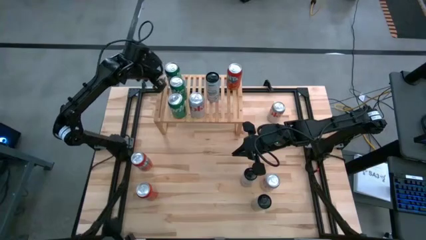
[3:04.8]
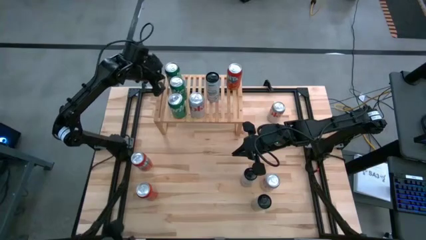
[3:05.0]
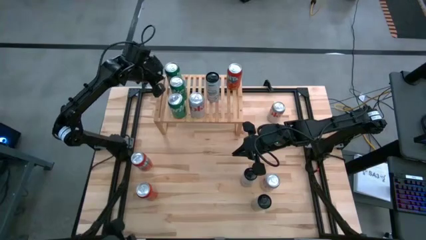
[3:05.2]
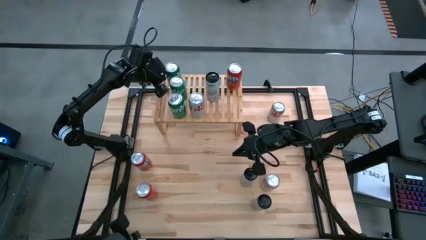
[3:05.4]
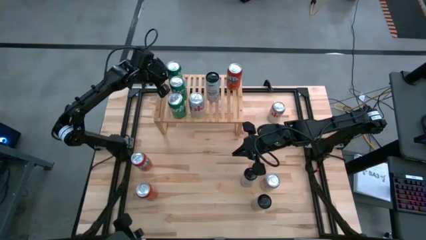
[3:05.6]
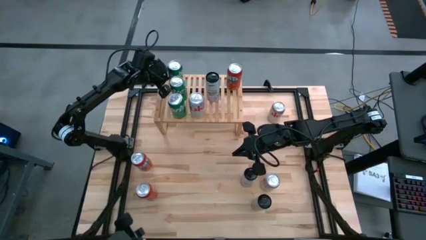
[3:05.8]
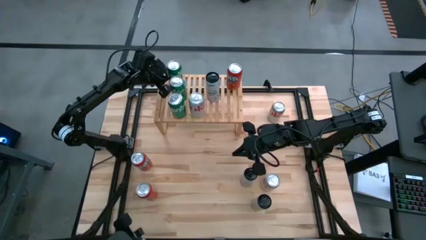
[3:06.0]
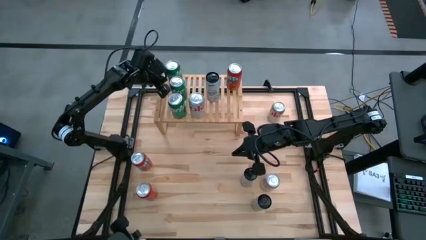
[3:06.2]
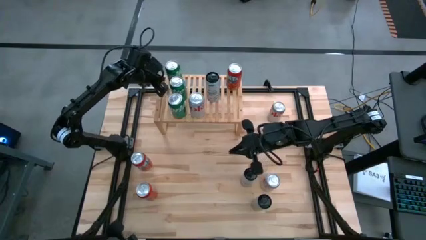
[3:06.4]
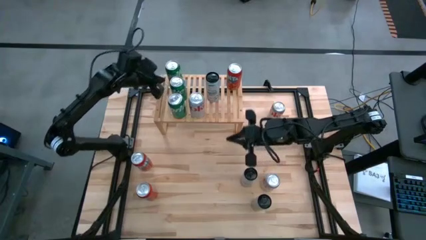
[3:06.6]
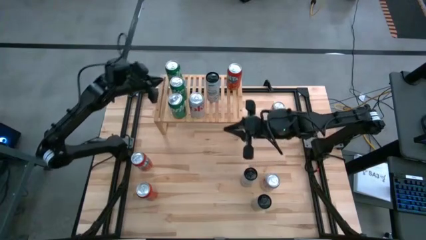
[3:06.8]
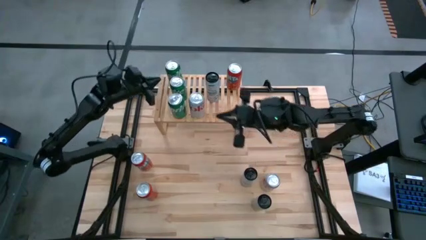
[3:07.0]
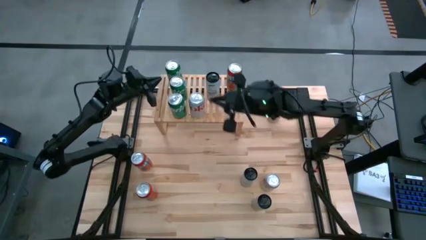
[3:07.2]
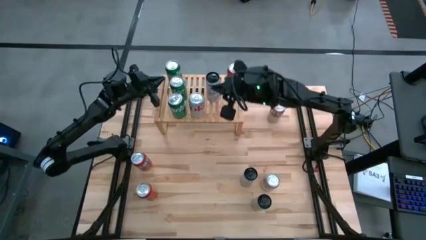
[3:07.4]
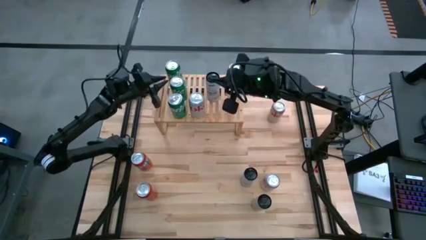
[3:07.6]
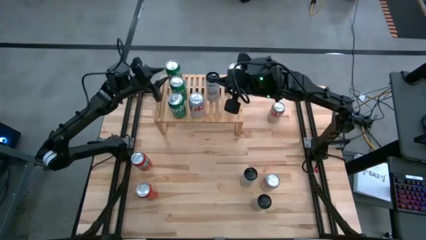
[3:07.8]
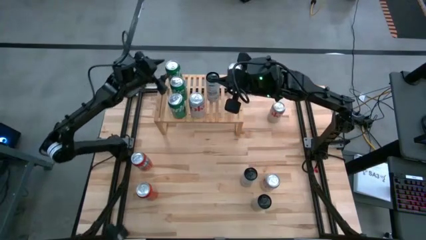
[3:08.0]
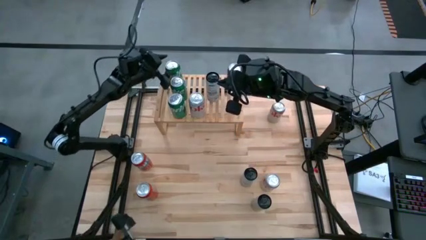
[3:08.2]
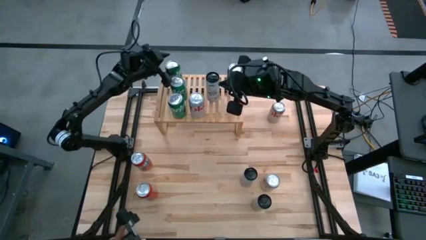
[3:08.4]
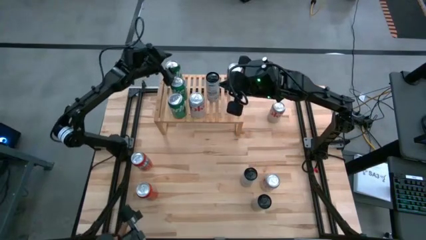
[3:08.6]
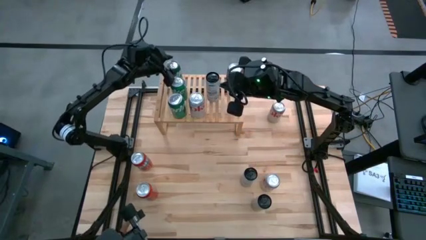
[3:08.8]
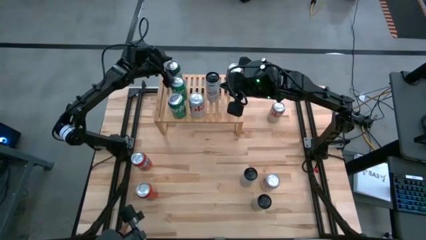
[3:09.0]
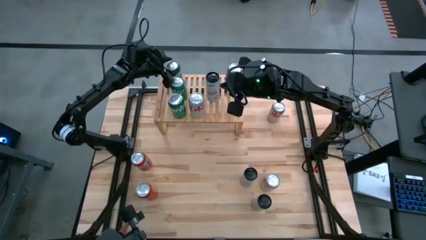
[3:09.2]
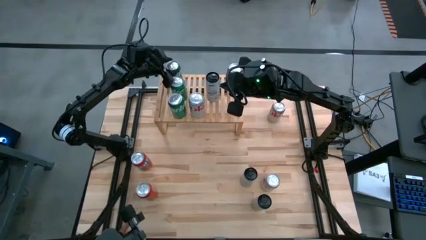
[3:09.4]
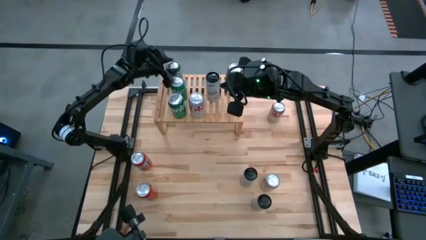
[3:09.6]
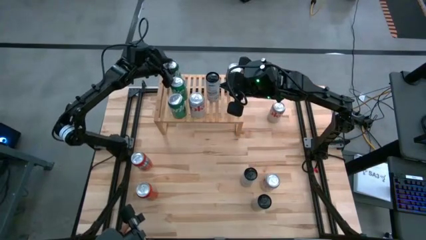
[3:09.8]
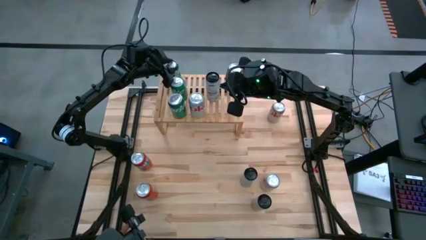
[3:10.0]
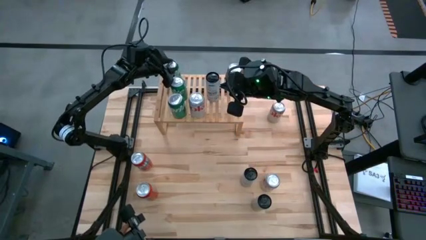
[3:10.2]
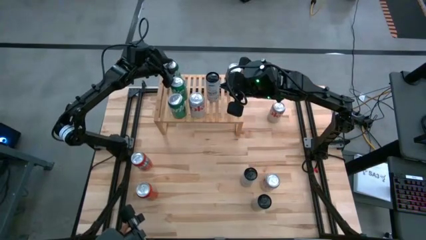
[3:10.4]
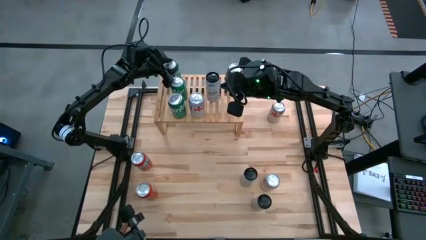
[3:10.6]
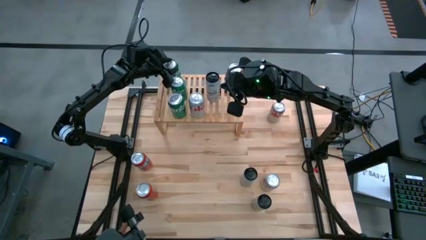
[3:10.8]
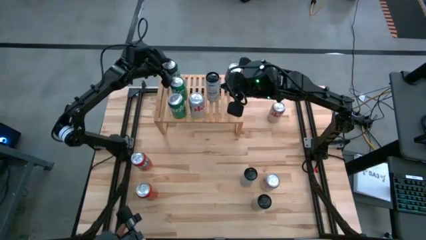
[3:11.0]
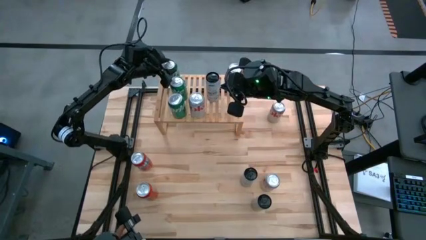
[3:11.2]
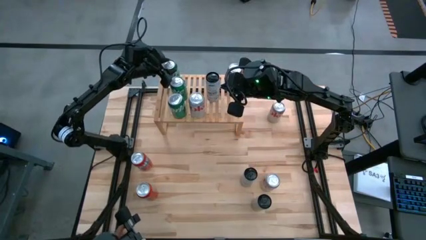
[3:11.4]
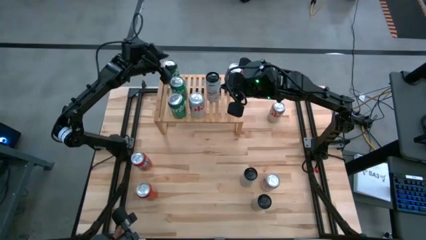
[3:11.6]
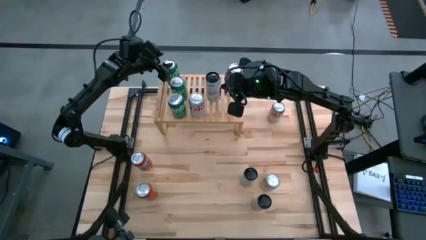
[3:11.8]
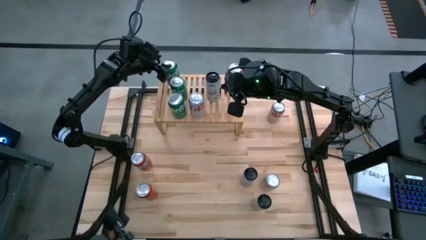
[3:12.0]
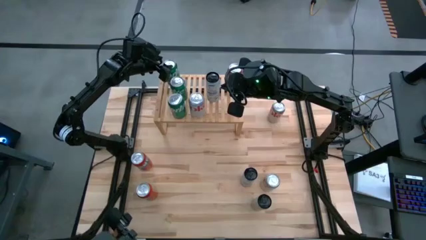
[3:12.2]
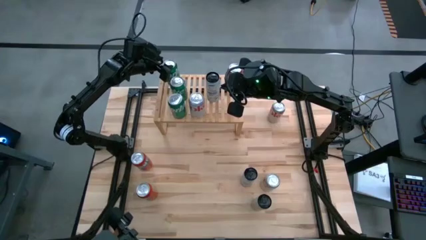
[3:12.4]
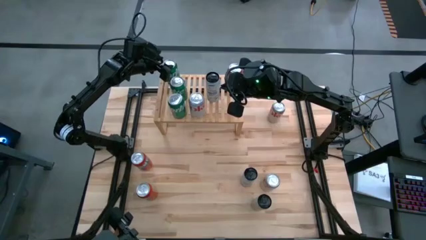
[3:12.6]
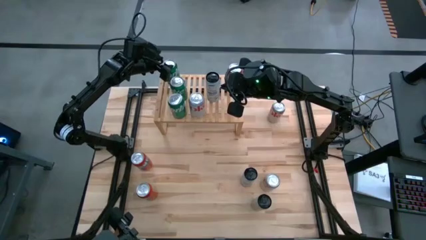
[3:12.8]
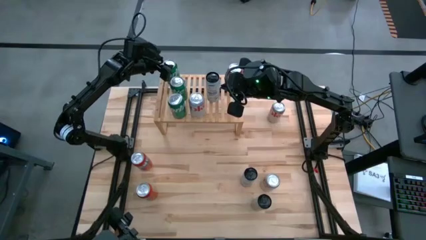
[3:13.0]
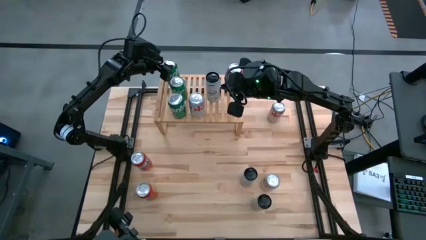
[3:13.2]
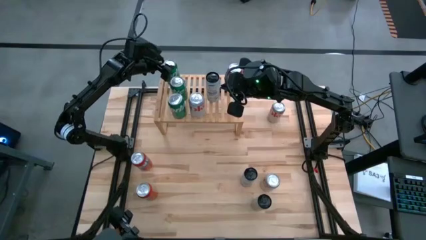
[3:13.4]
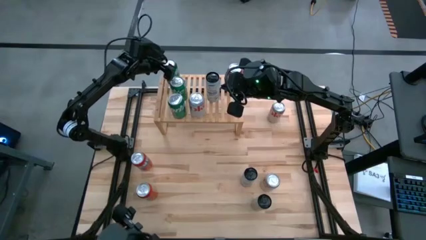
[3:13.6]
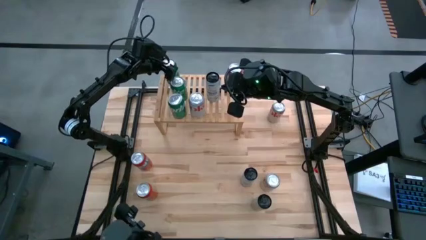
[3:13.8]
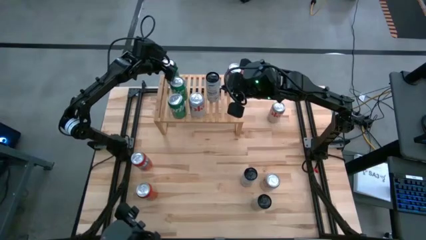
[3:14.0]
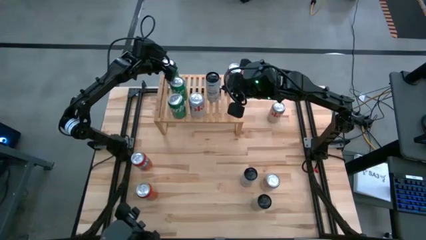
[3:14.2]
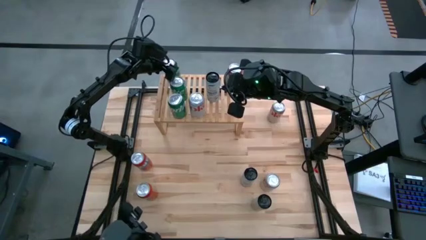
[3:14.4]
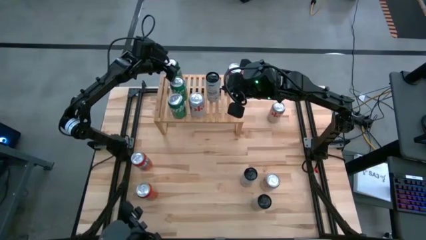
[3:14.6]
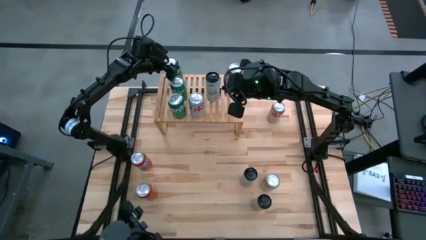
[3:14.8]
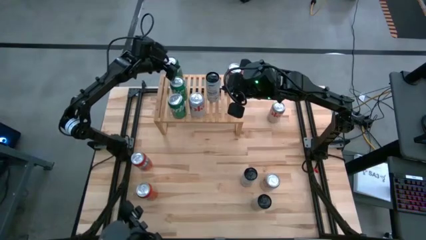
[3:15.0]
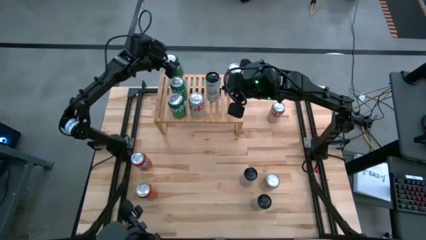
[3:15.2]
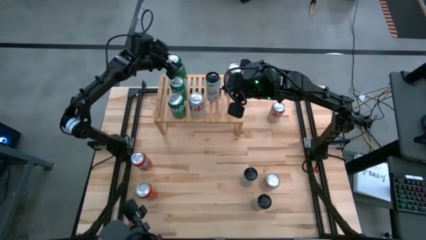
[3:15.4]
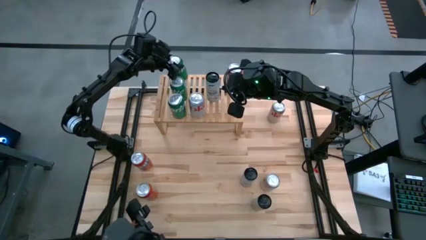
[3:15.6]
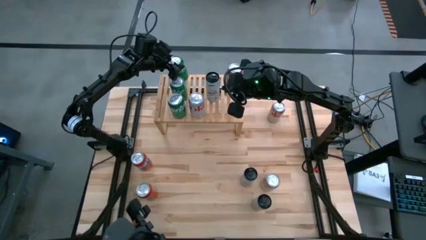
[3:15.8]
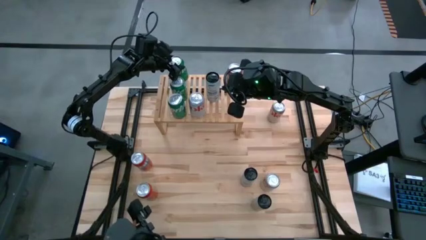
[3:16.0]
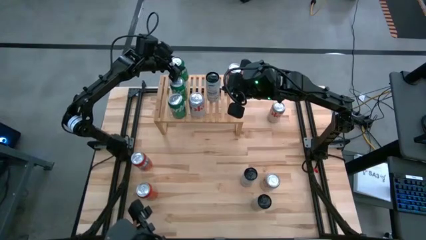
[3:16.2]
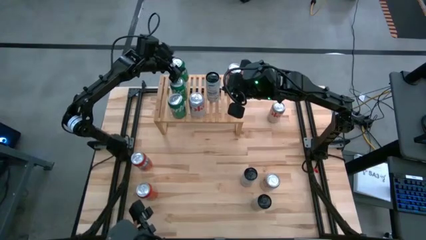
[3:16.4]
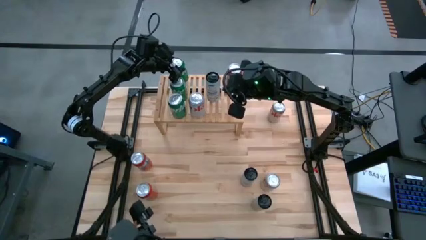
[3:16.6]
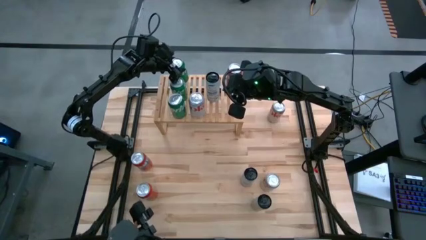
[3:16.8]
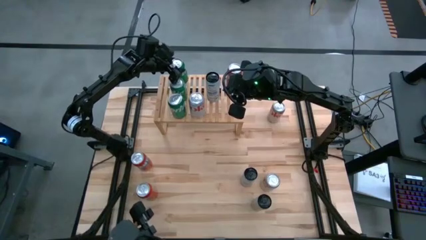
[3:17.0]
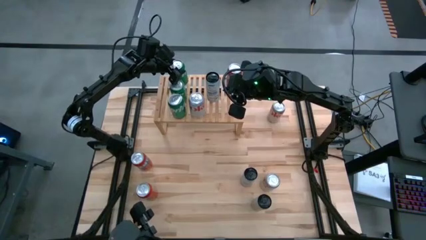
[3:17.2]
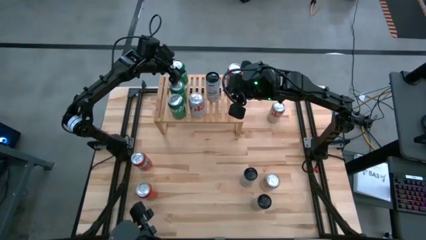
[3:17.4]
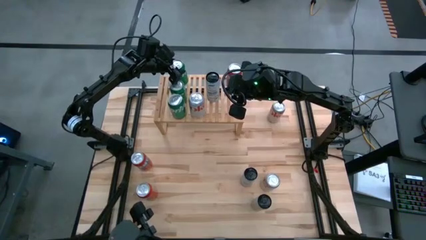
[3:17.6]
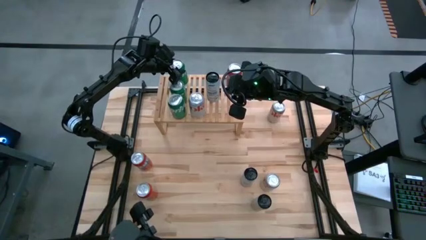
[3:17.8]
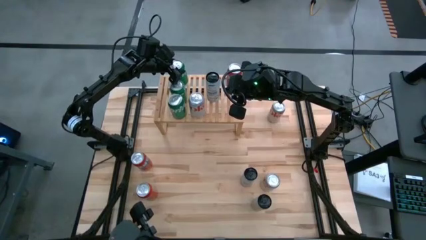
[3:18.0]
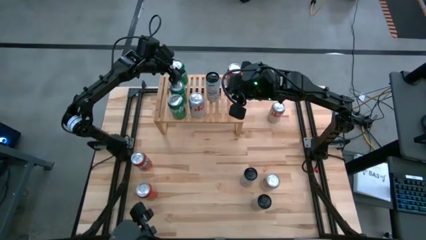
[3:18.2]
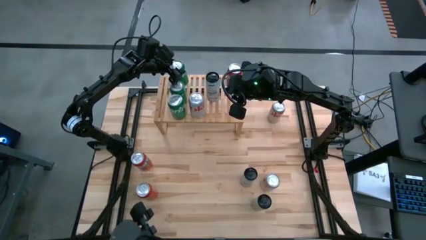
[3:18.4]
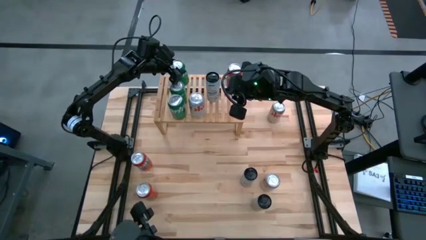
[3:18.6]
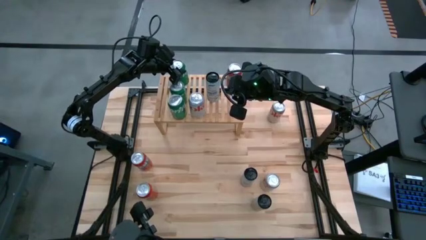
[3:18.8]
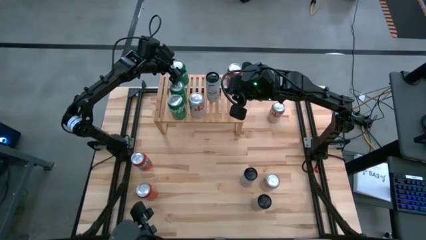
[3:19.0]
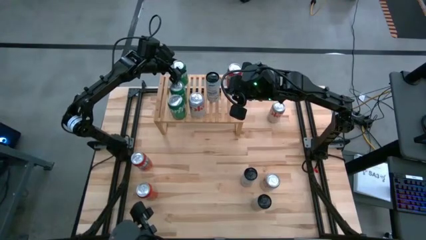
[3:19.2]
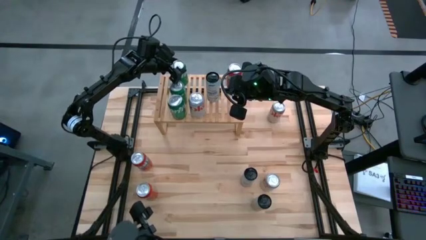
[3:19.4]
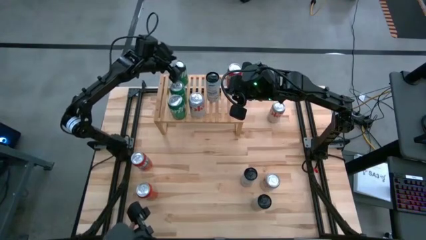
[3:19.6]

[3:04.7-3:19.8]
Task: Place canned beverage on shelf
Put the green soda can on the shelf

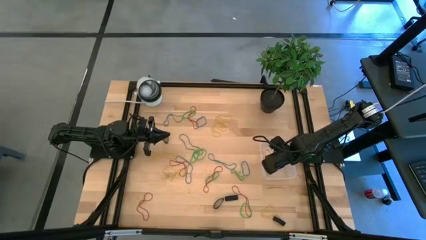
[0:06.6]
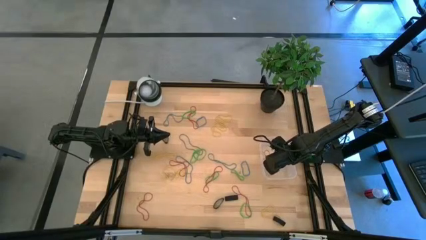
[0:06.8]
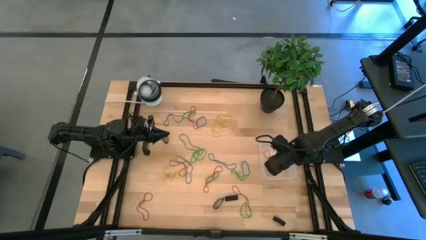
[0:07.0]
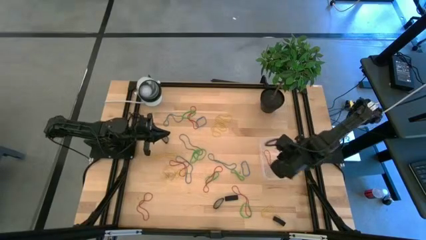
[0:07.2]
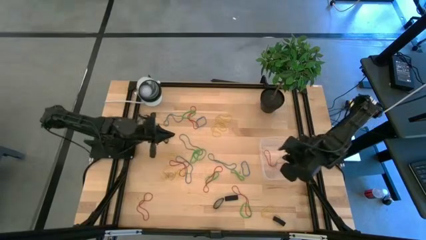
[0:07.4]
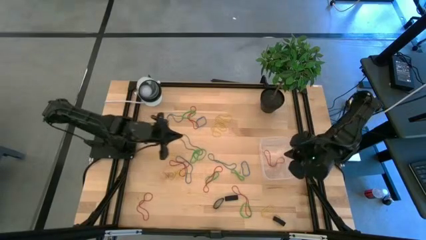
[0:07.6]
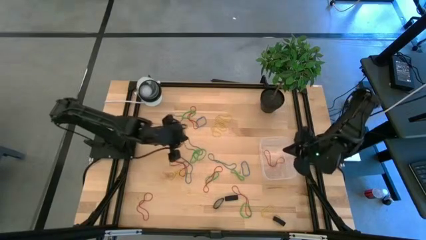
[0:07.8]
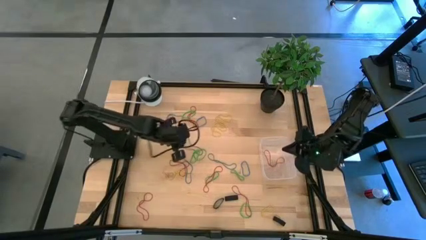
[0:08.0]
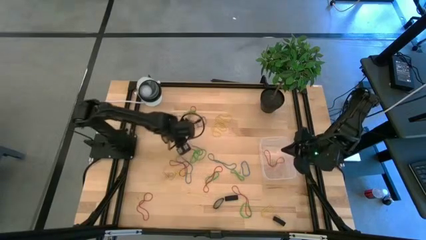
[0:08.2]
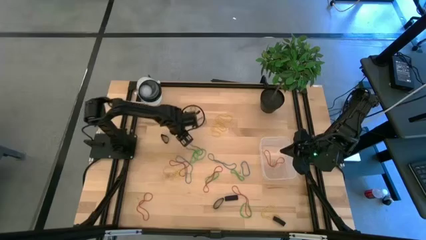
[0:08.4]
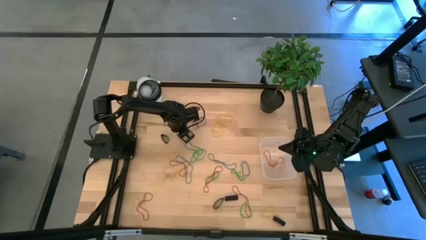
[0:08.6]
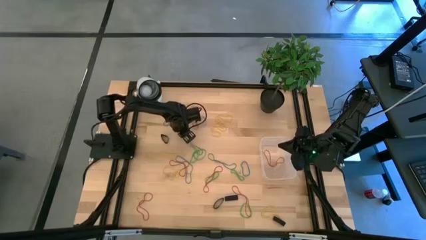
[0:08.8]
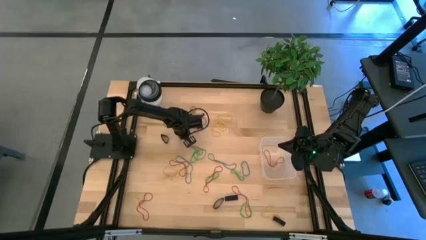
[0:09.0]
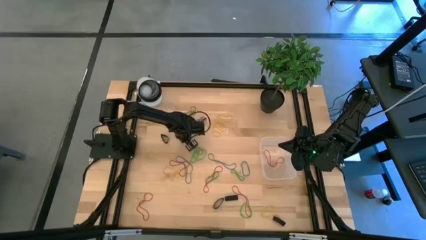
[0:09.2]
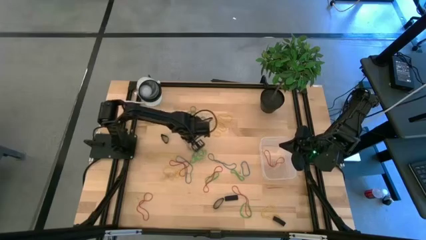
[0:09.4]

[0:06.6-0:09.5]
Task: Pick and place rubber bands into bin
Put the blue rubber band into the transparent bin
